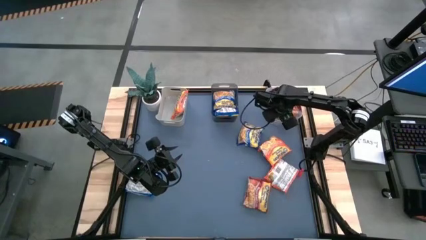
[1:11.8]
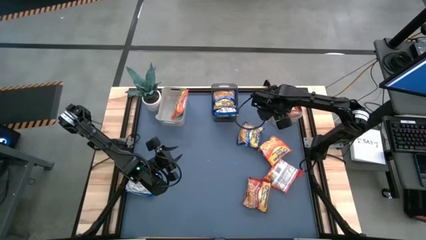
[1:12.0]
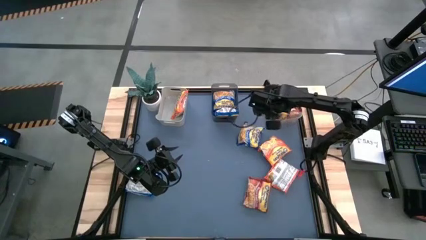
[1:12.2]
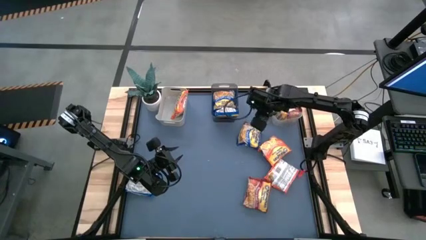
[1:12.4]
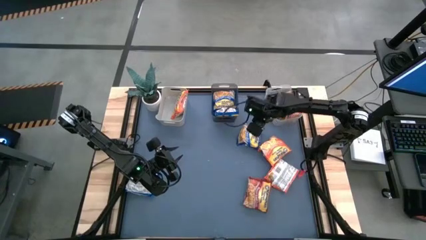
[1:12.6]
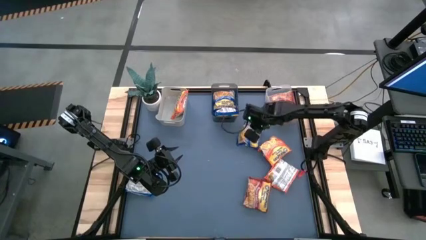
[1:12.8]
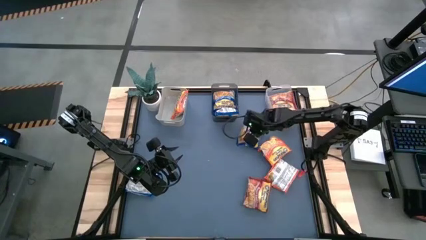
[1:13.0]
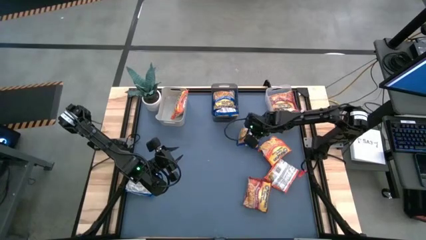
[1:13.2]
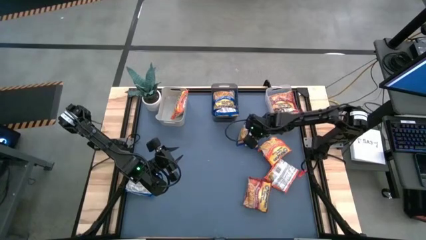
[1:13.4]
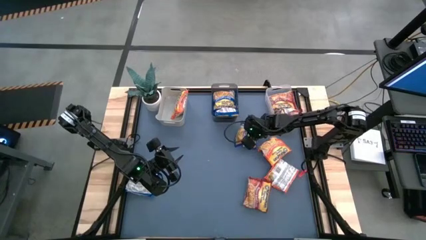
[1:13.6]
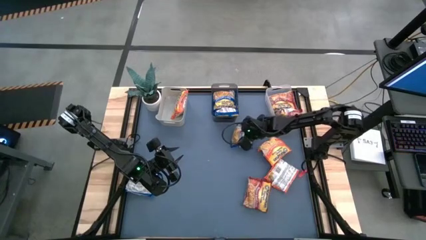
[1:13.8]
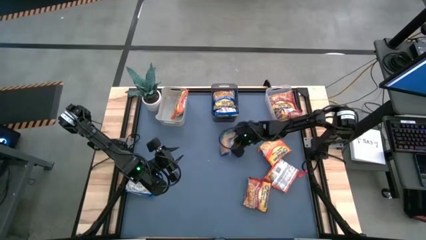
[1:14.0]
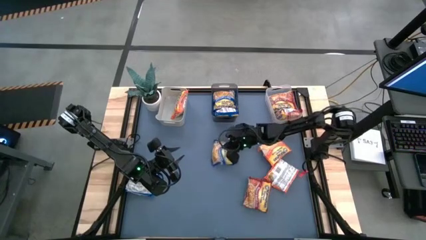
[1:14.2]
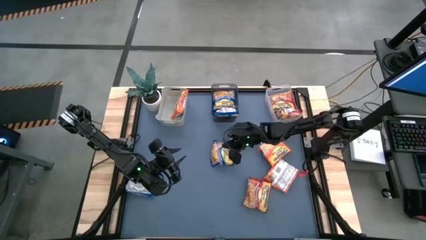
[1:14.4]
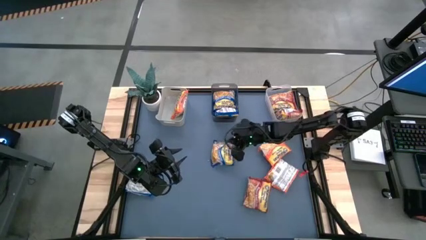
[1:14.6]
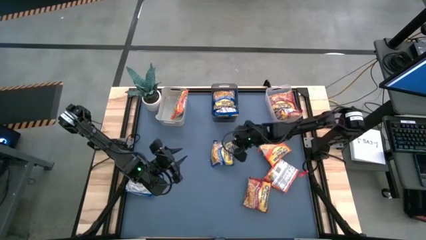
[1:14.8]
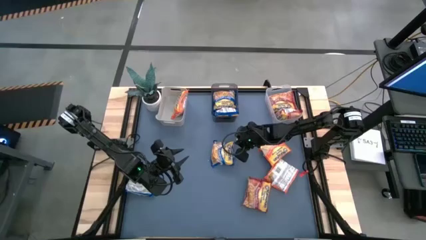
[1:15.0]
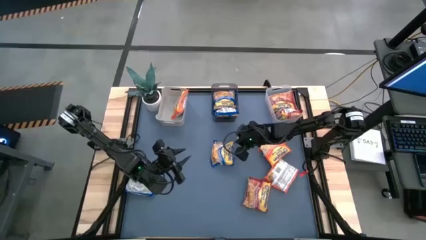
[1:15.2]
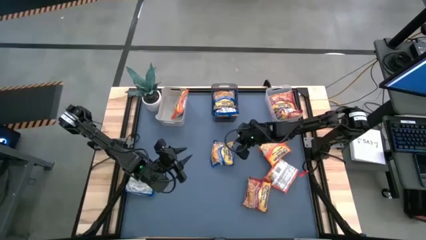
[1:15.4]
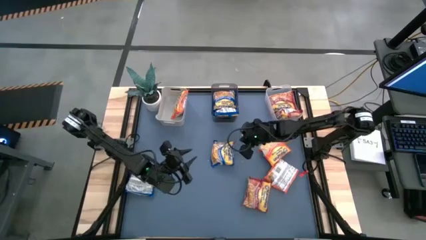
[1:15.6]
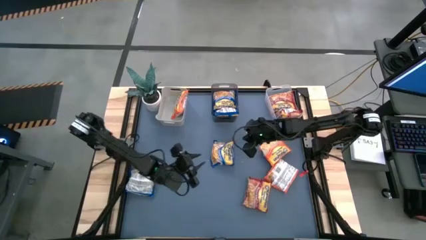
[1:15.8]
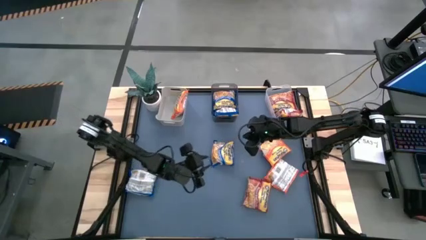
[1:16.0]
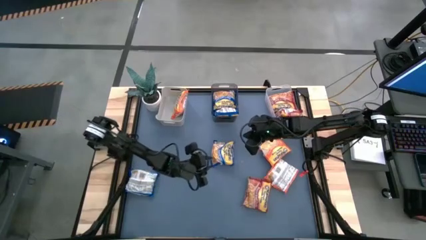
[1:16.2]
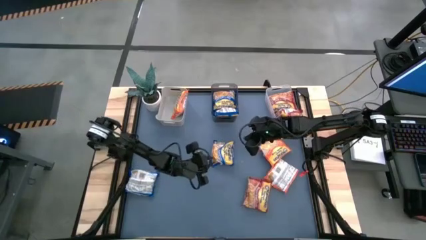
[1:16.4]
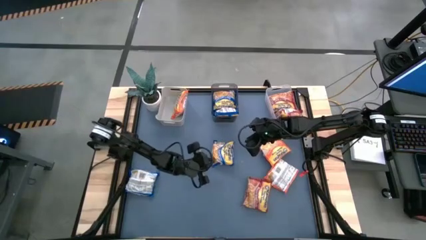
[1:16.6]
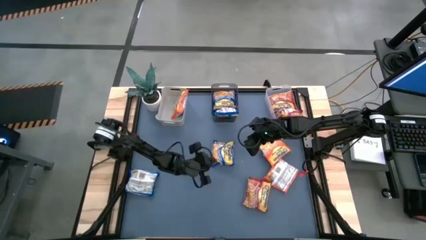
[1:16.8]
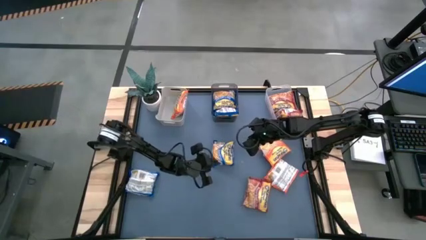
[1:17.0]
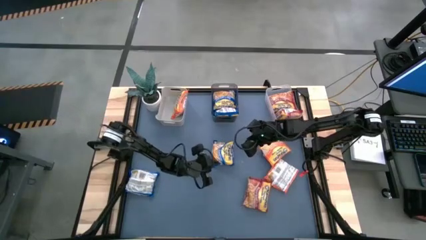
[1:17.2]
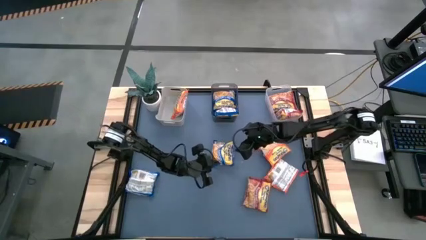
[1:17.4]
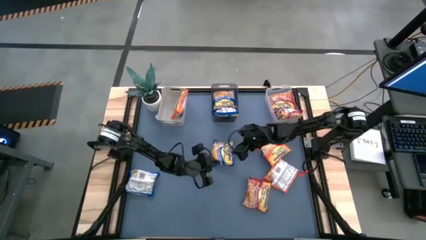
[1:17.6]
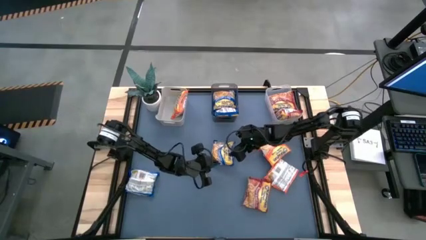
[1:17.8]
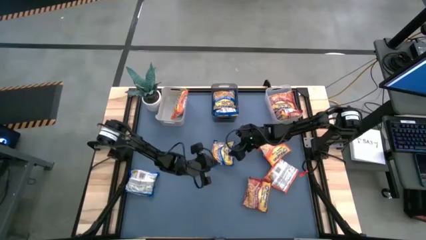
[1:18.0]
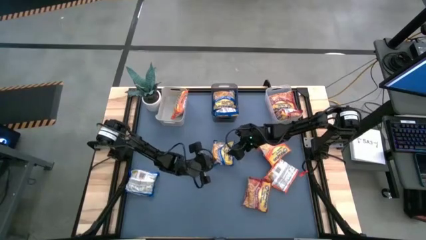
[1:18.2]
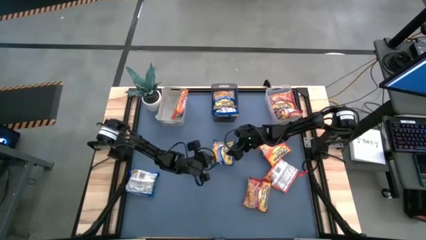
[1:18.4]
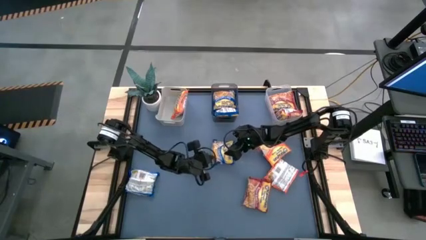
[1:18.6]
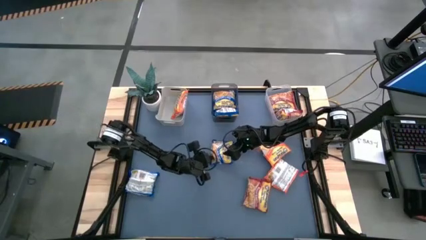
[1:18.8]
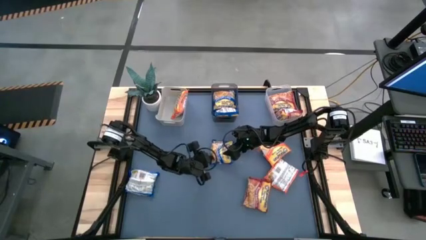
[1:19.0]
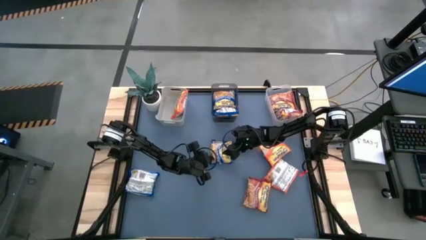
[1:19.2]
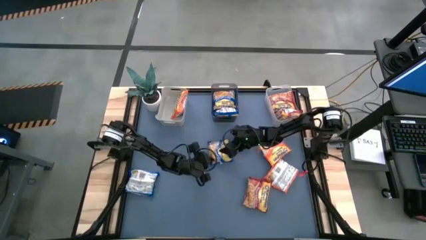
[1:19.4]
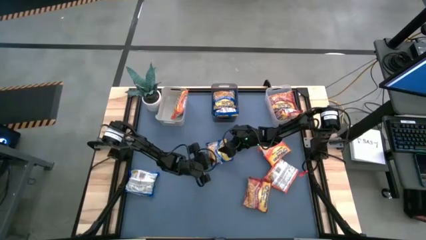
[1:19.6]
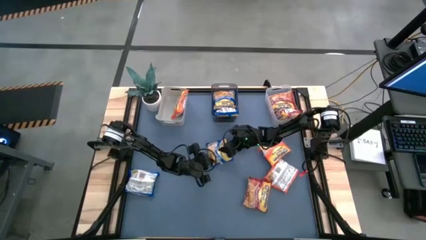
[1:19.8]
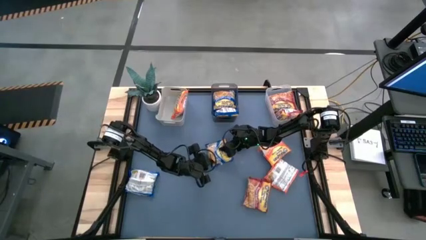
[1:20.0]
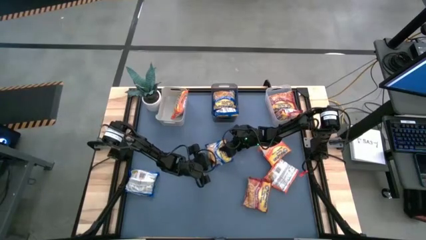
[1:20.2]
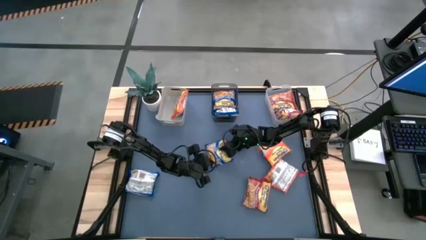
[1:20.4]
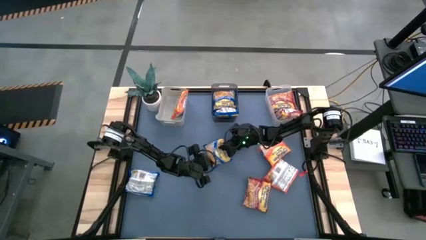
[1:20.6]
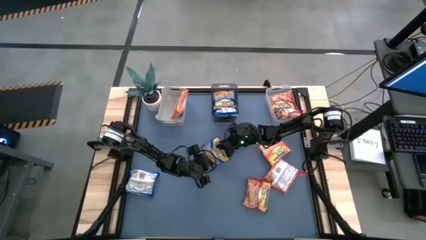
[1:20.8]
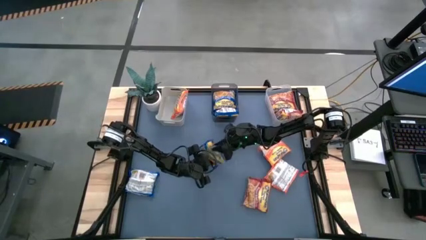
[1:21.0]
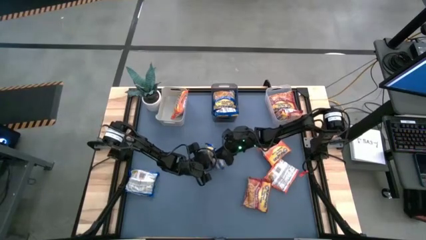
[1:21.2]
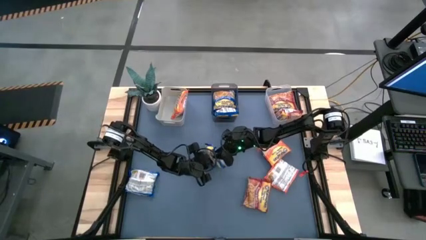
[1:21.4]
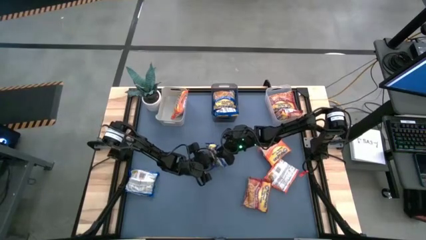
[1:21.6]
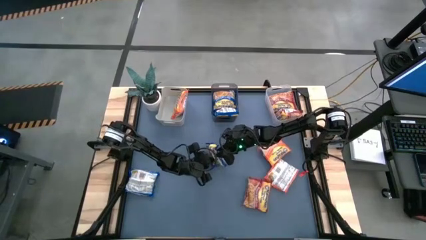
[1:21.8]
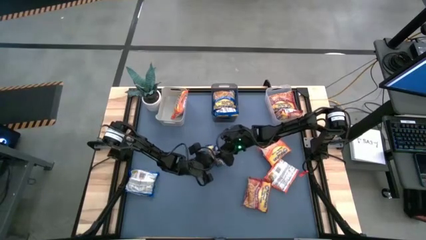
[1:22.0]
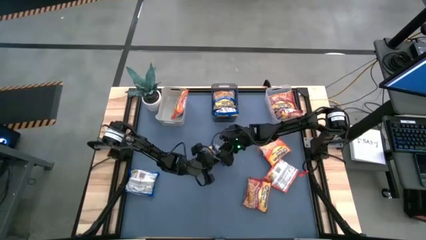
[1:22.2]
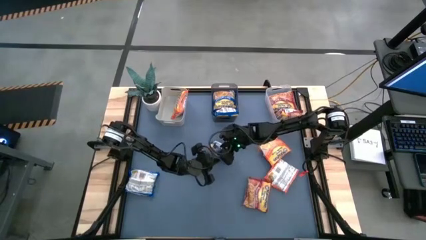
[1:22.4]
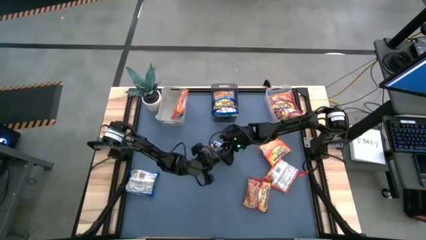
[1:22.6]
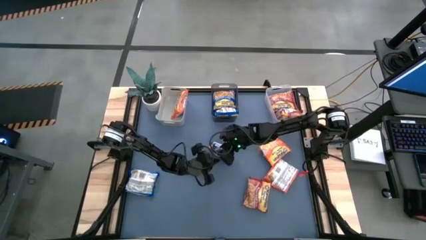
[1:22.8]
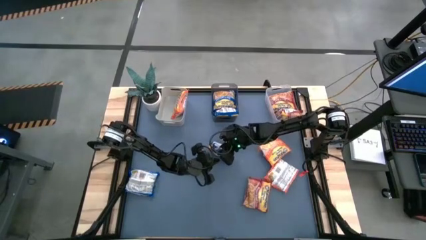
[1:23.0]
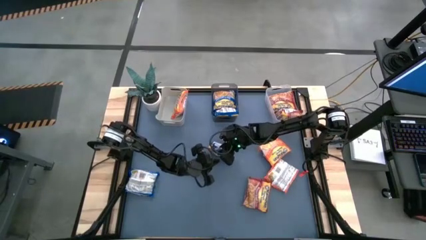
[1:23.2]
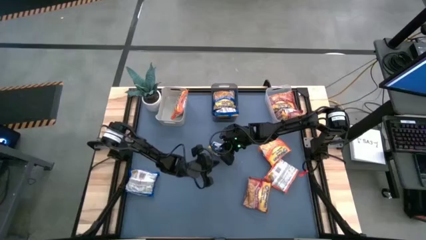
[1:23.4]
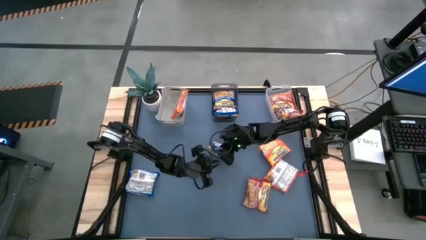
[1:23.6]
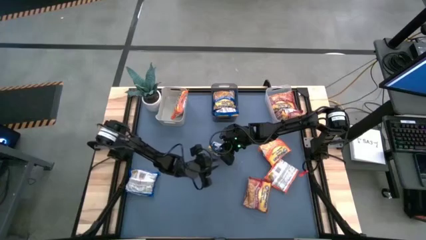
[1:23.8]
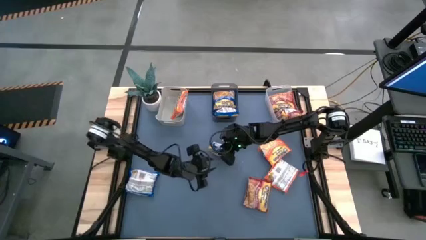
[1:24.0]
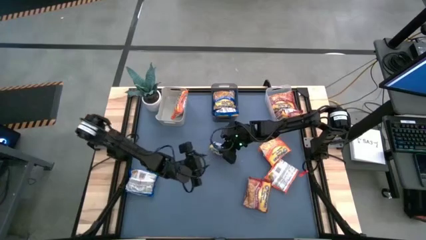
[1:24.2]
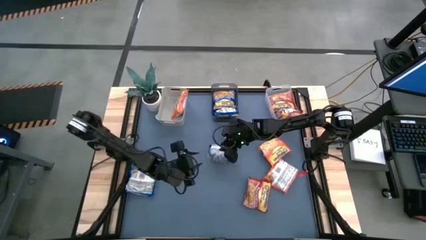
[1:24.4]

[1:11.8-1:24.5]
Task: Sort Maruchan noodles
Put the blue noodle pack into the black bin

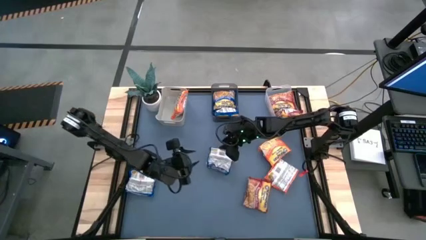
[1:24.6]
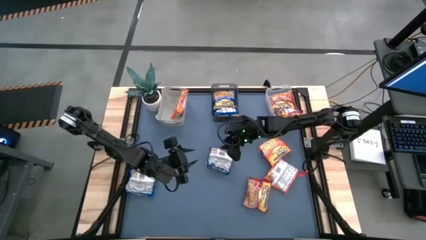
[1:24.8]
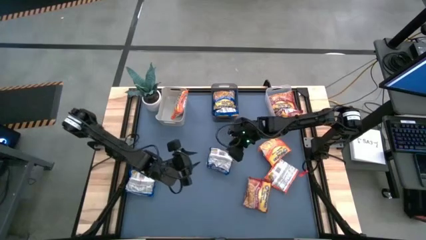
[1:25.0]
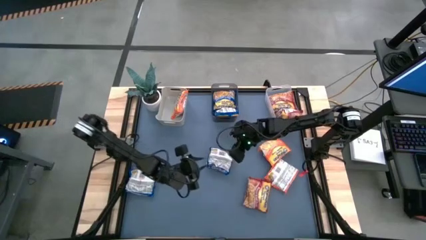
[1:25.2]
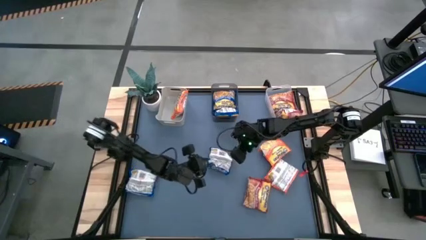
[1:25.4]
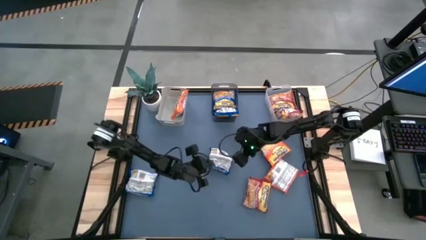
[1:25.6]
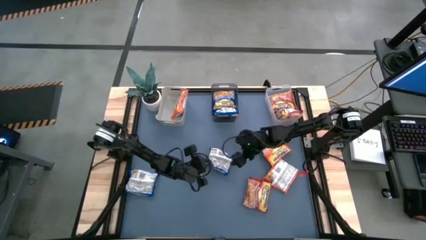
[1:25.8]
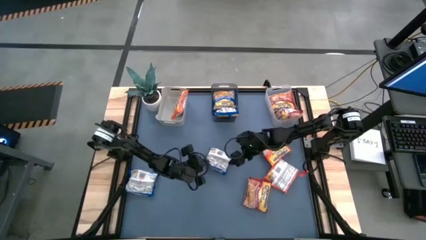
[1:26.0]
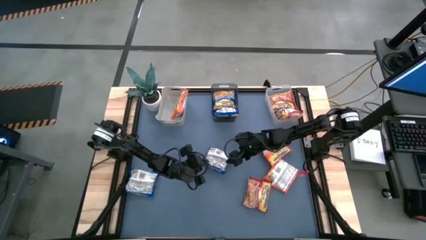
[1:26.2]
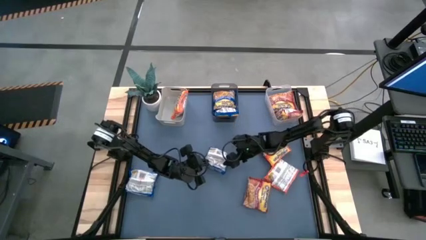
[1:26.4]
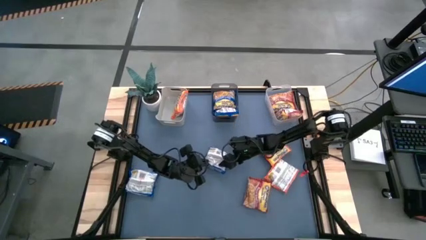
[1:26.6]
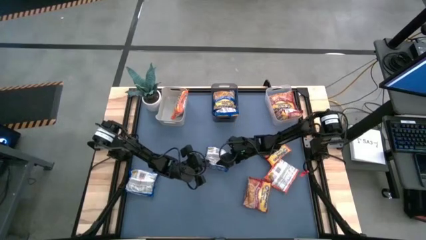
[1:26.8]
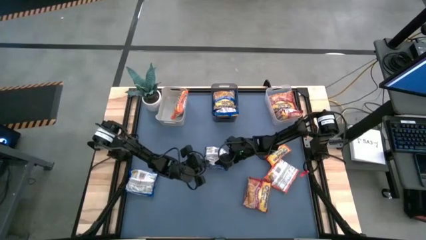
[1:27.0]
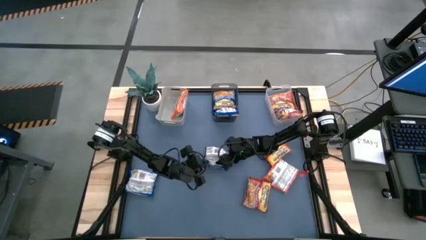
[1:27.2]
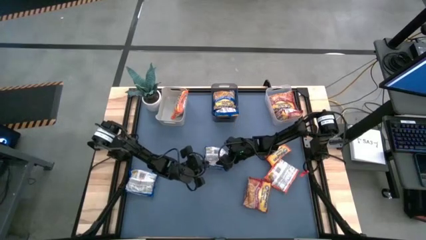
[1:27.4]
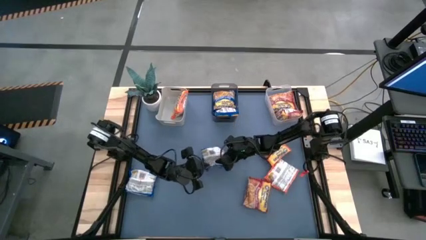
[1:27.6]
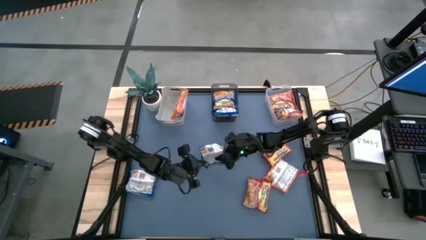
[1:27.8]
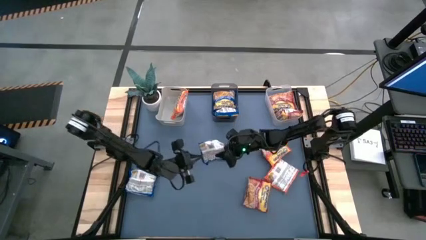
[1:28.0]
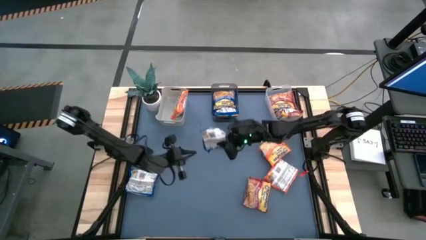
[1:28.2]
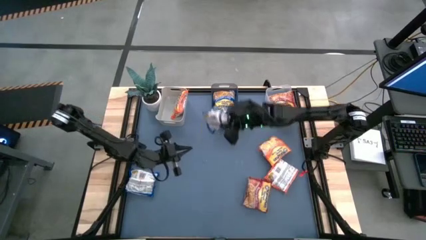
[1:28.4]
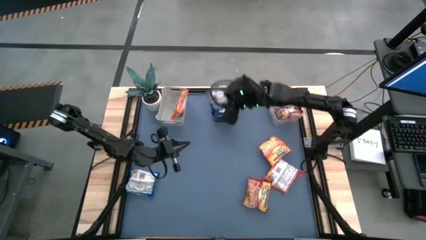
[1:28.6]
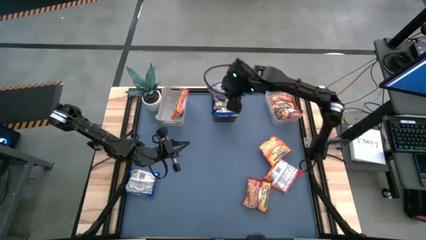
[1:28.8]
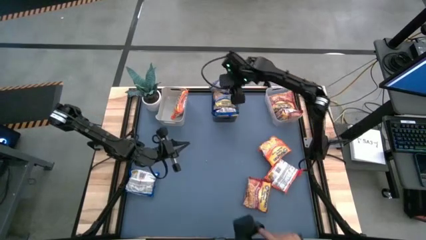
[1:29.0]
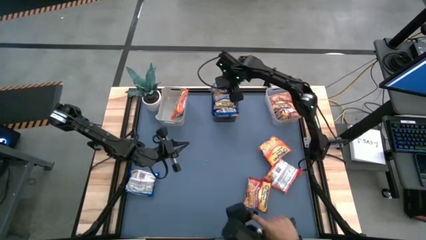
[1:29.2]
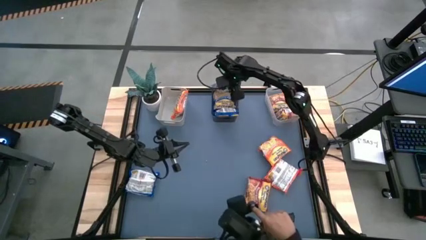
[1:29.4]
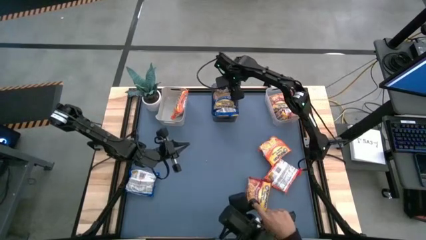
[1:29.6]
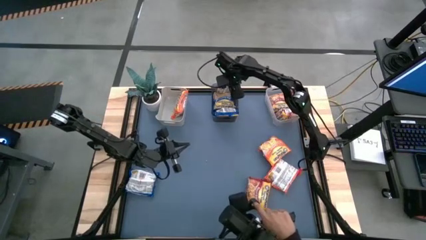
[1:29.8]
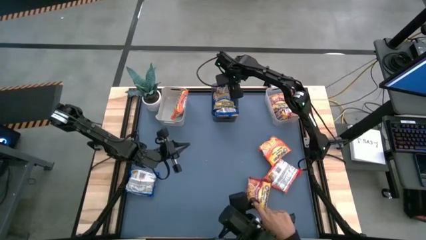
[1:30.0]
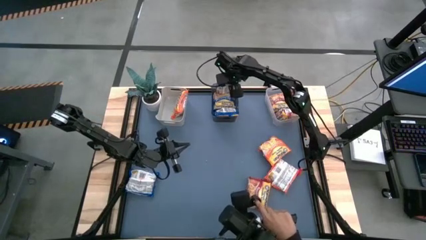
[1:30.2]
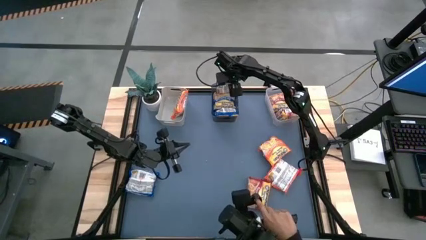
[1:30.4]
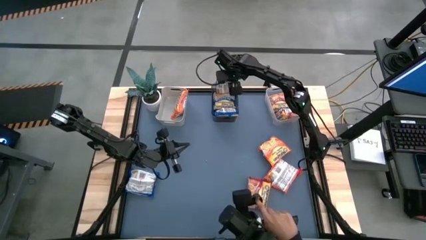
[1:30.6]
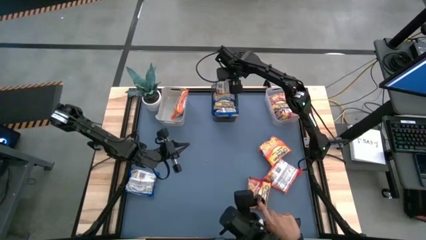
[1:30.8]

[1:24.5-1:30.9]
Put the blue noodle pack into the black bin
